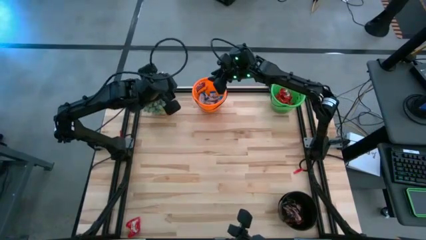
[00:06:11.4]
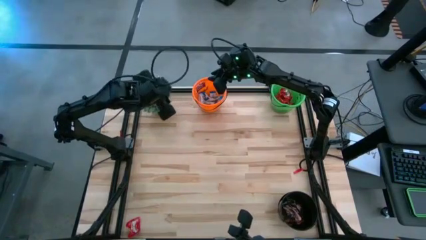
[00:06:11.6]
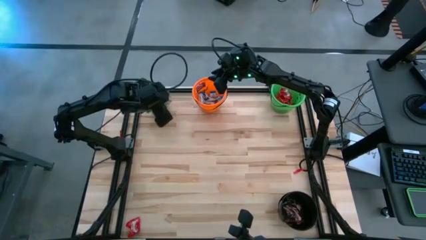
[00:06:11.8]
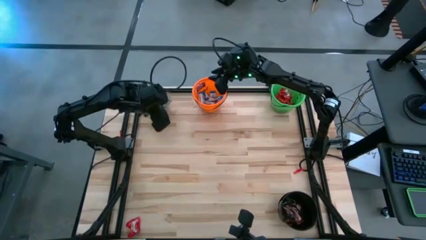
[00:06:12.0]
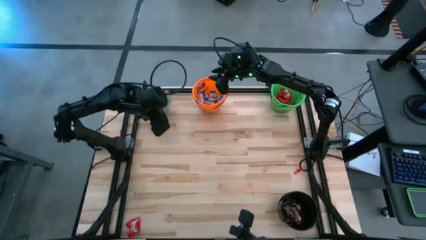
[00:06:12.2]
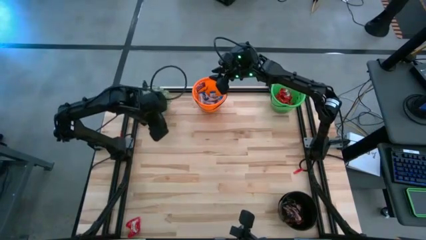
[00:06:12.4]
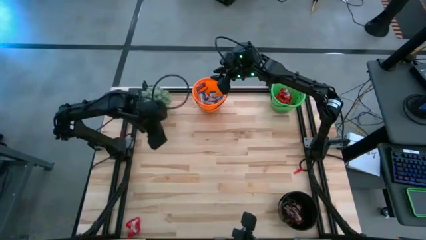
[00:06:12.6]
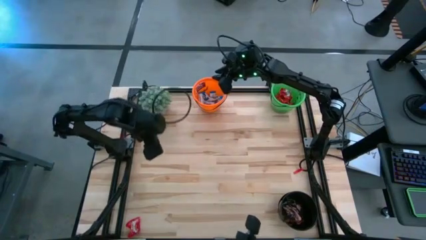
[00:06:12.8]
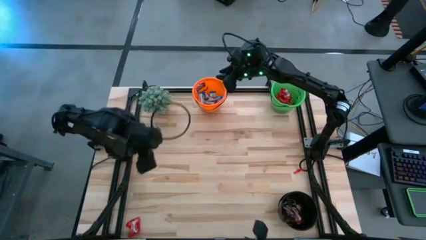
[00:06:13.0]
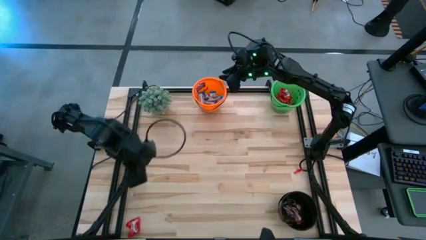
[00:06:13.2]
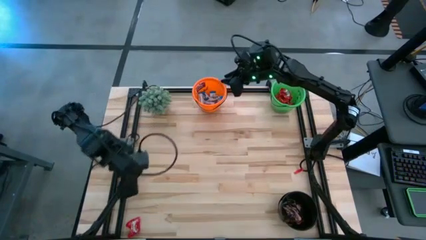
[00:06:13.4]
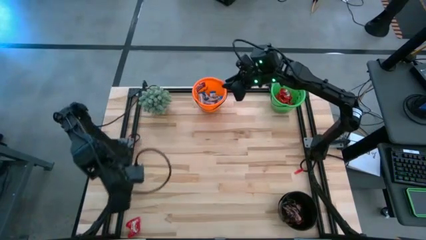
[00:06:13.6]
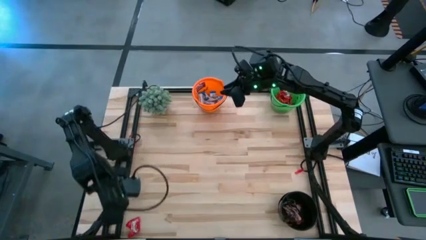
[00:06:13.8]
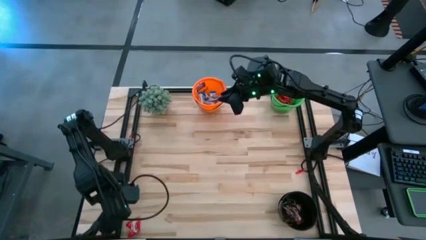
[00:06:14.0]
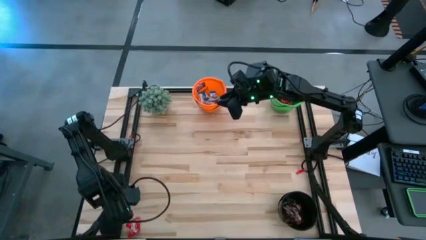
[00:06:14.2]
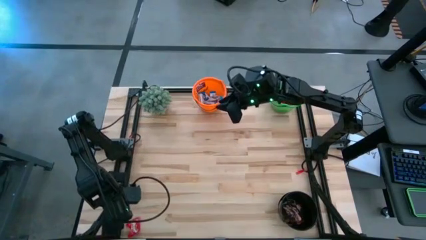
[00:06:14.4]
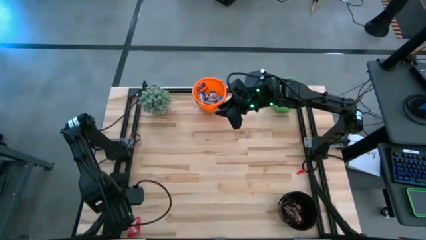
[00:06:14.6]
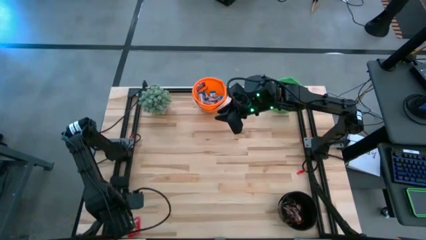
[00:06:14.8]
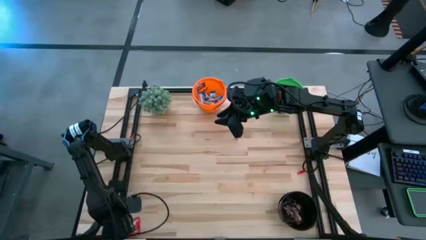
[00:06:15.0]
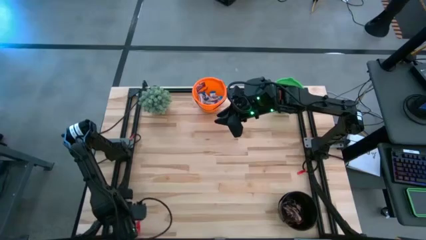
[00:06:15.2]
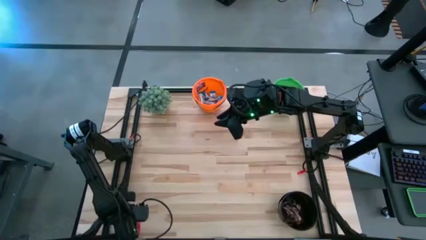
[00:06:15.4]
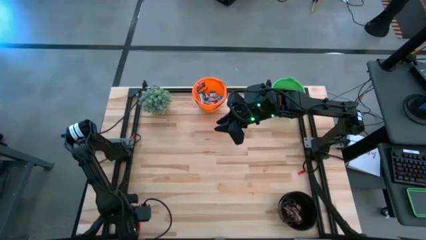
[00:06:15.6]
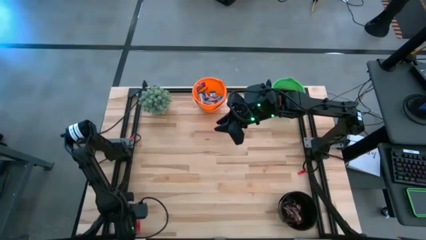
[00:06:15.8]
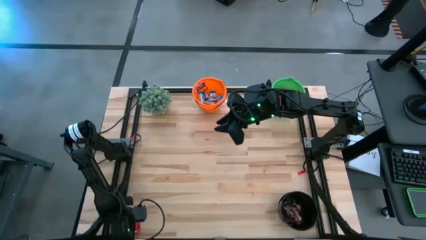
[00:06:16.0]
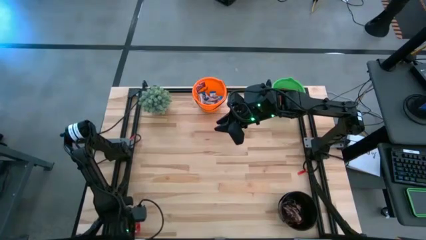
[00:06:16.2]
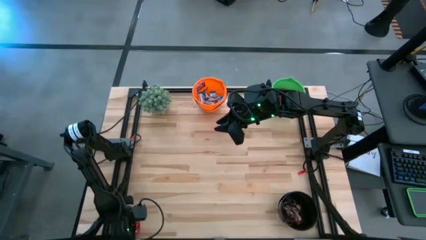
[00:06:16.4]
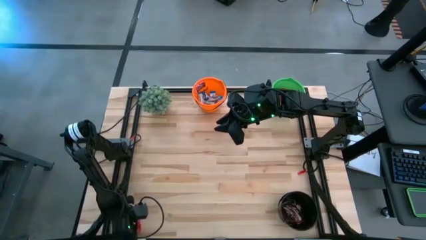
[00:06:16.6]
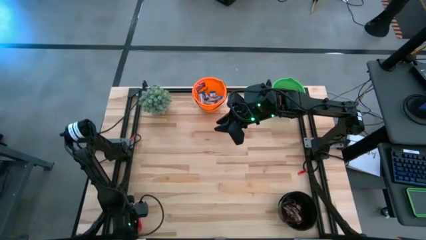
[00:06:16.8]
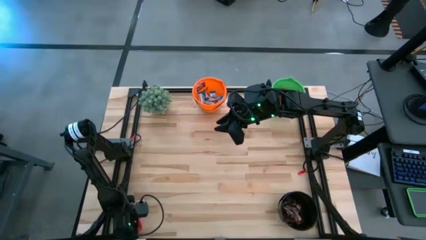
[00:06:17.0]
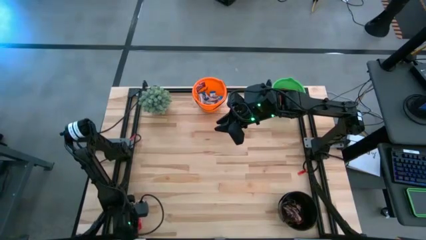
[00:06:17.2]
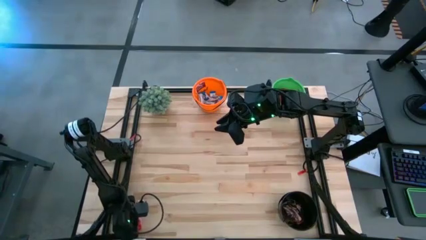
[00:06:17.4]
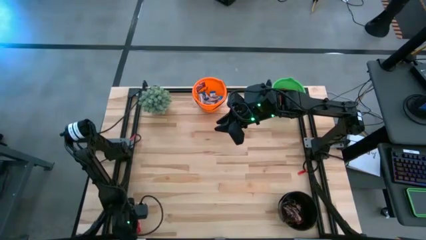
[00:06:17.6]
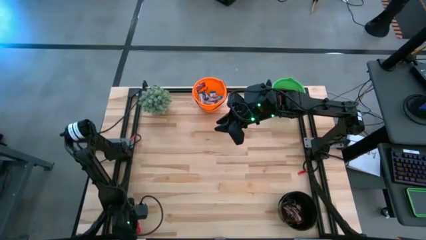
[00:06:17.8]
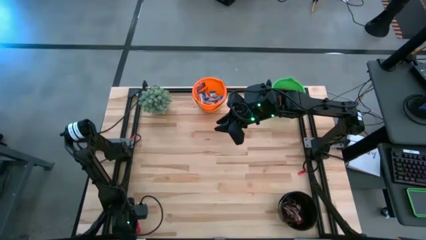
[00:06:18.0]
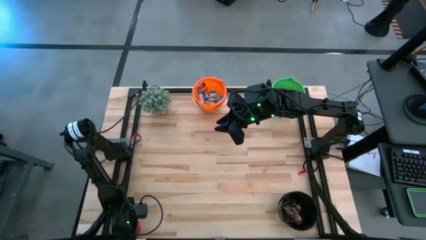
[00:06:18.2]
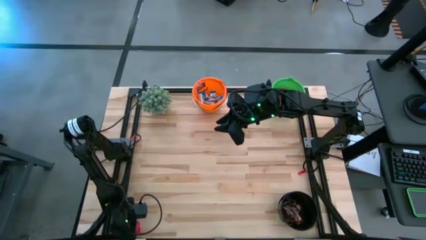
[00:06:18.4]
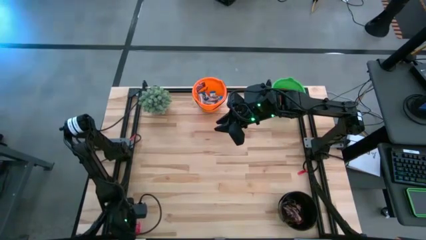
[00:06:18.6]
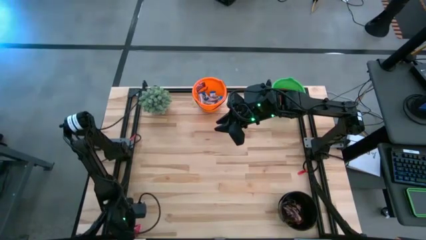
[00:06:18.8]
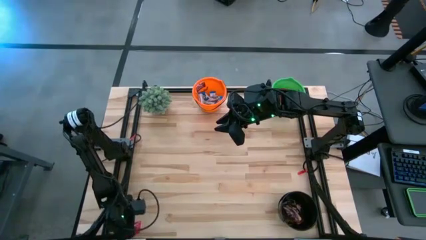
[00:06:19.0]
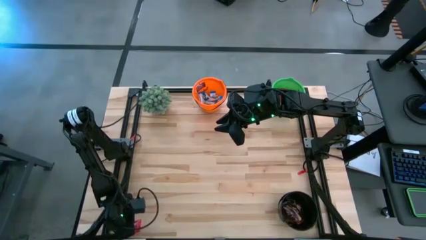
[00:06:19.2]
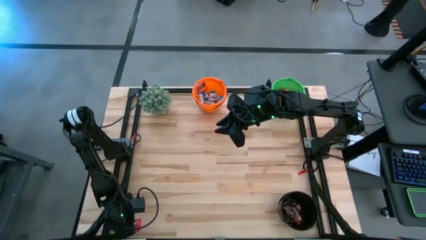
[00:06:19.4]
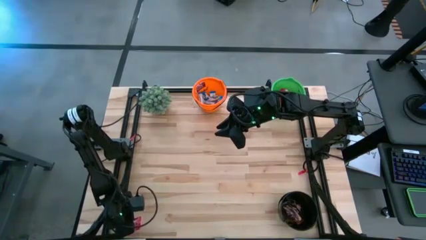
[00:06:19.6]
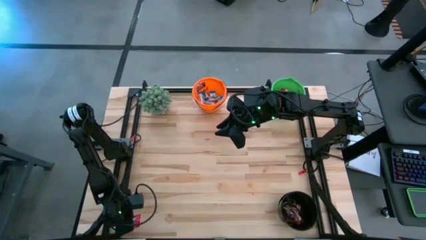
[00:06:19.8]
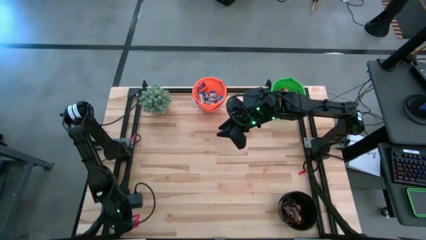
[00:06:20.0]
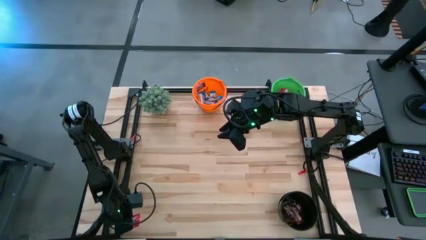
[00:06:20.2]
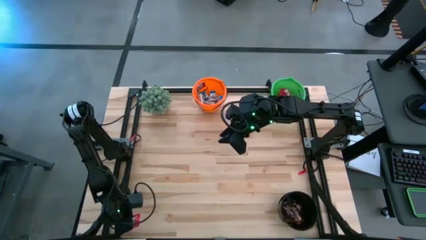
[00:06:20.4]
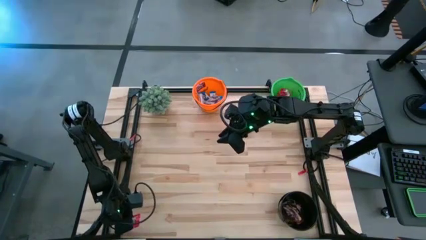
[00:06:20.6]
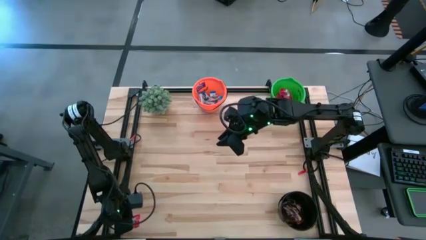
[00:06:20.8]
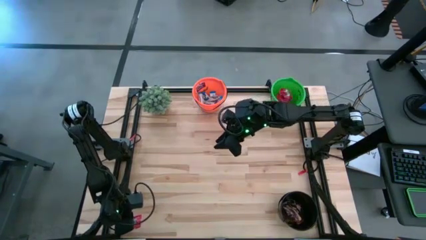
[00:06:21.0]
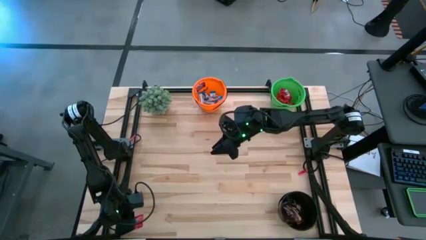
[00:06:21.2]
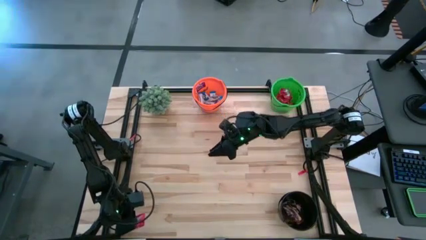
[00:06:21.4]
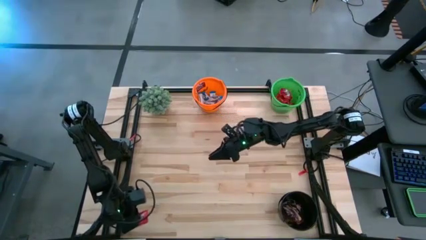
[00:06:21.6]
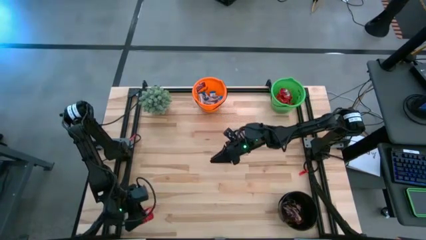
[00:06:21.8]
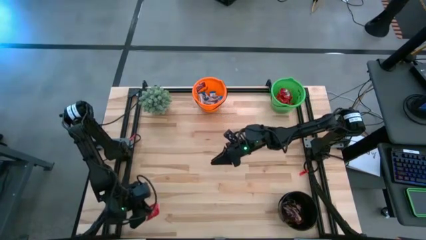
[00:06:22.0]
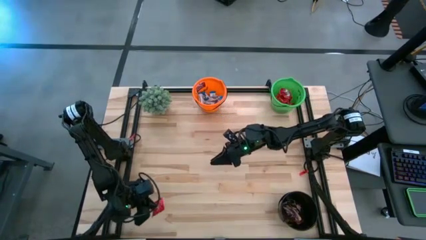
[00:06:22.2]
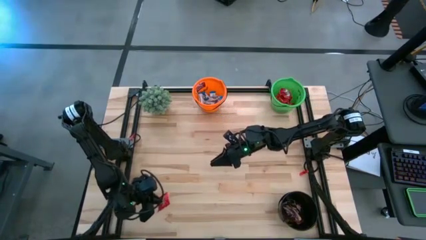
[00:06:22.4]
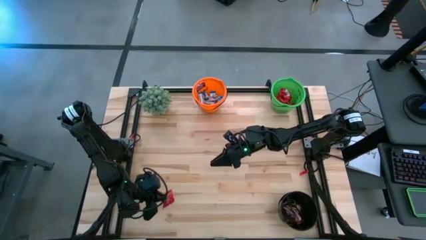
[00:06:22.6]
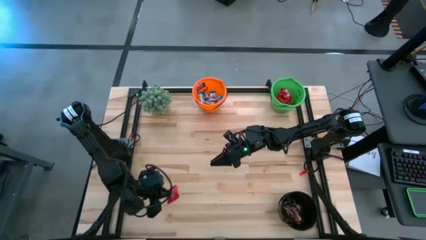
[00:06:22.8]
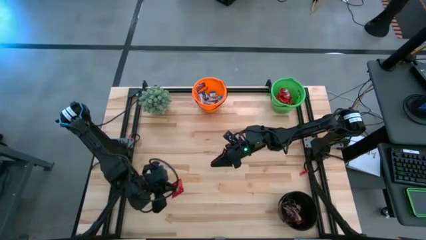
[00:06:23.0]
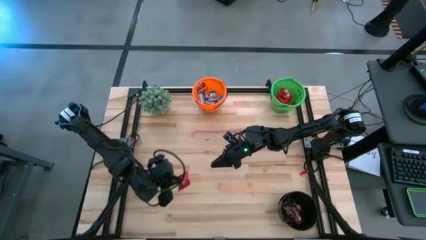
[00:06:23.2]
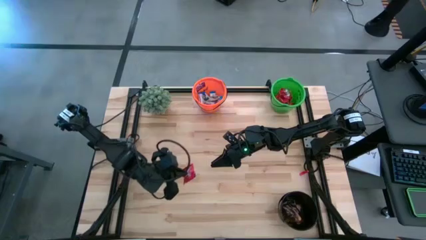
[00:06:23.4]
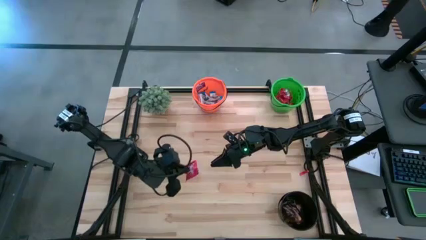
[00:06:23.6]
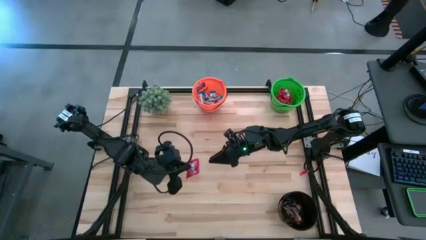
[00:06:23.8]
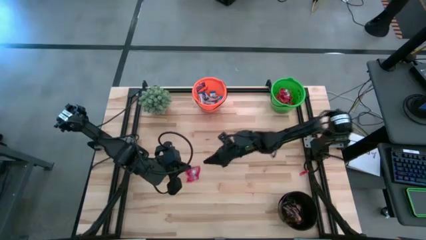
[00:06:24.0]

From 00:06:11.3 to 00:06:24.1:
Task: Organize candy in baskets
Put the red candy into the green bucket
